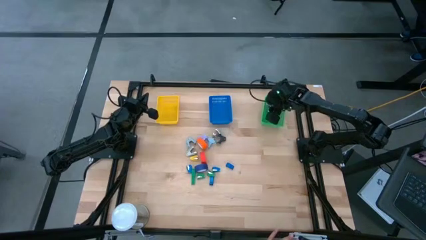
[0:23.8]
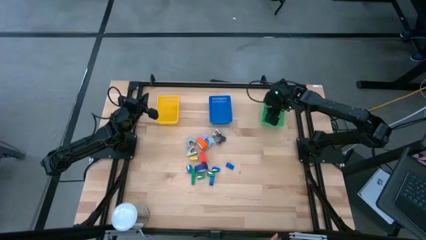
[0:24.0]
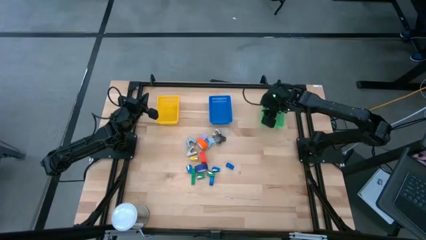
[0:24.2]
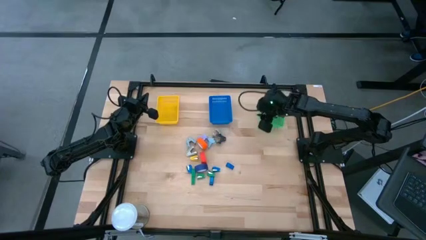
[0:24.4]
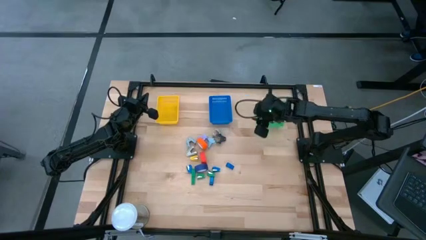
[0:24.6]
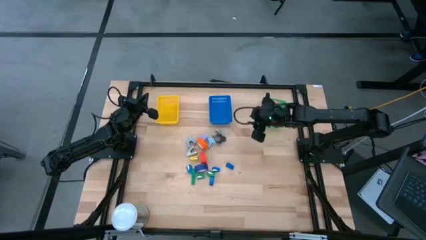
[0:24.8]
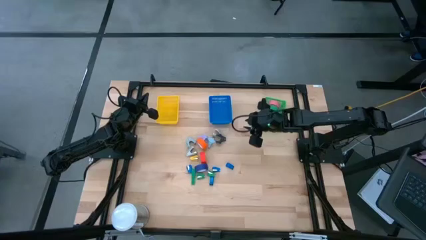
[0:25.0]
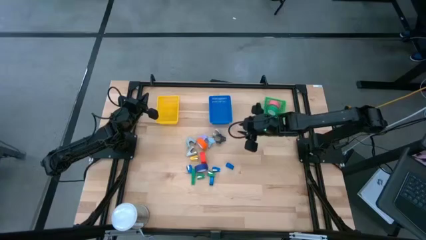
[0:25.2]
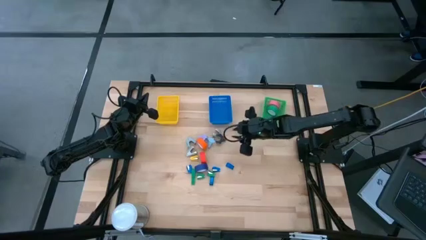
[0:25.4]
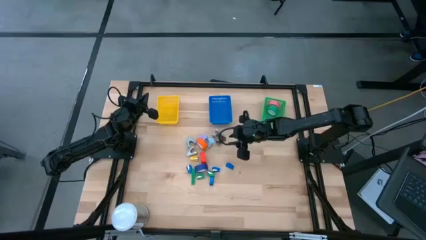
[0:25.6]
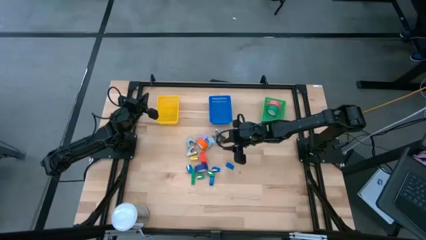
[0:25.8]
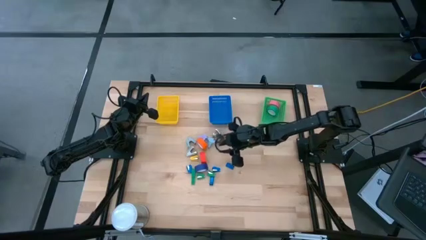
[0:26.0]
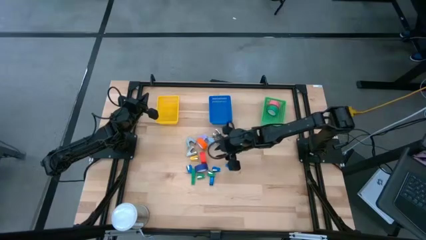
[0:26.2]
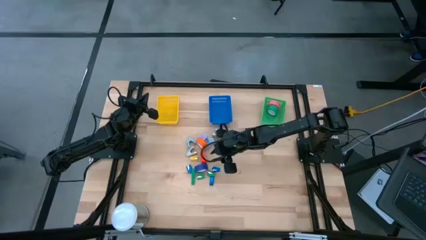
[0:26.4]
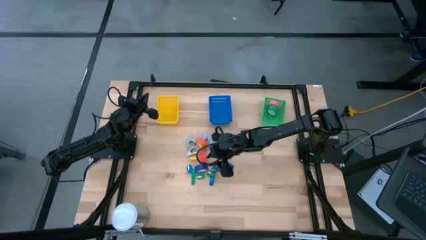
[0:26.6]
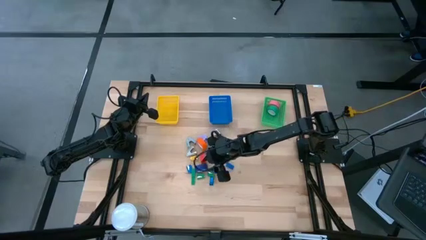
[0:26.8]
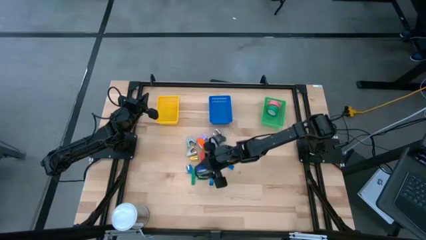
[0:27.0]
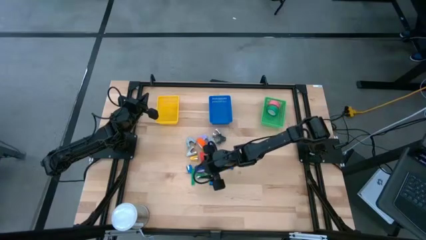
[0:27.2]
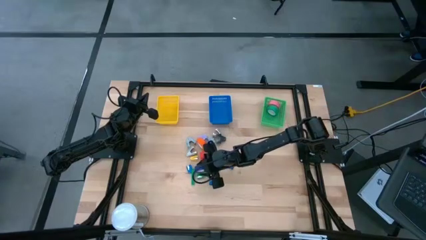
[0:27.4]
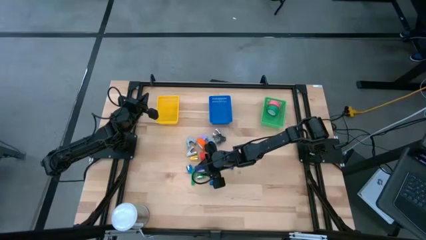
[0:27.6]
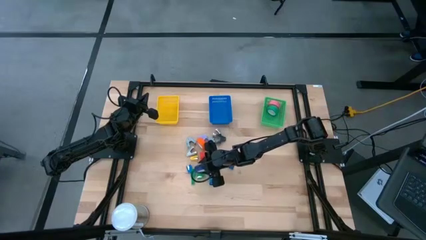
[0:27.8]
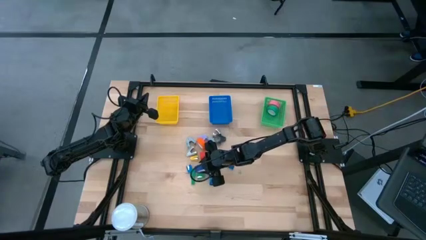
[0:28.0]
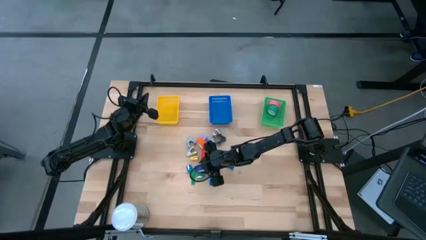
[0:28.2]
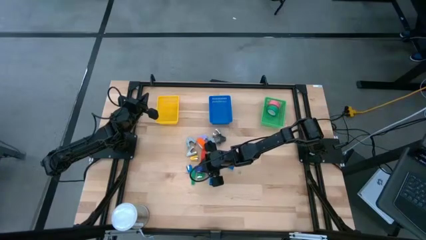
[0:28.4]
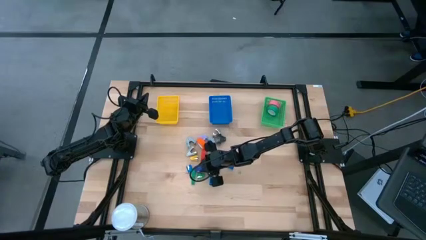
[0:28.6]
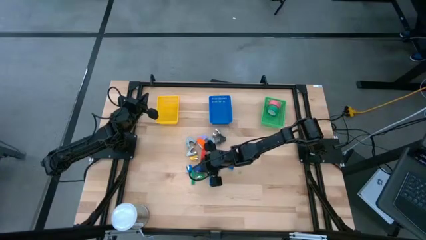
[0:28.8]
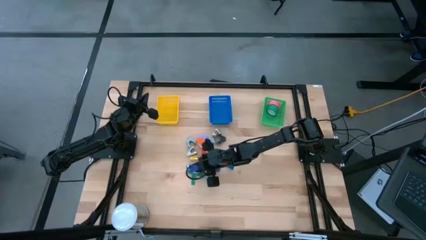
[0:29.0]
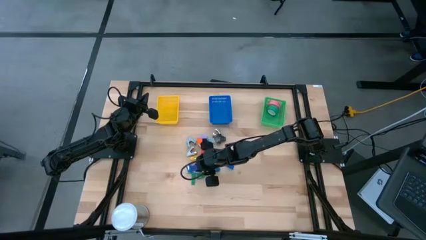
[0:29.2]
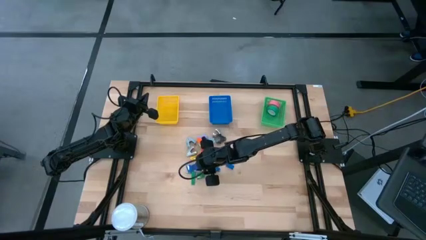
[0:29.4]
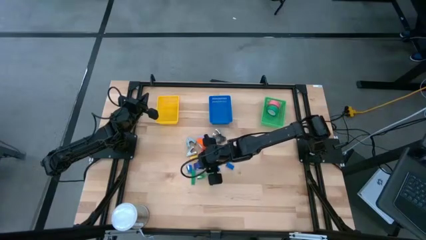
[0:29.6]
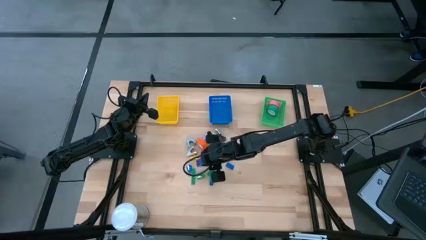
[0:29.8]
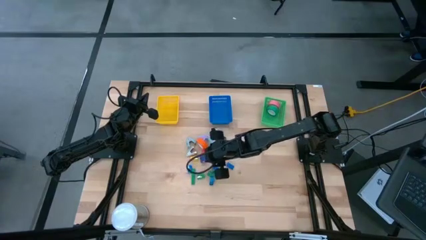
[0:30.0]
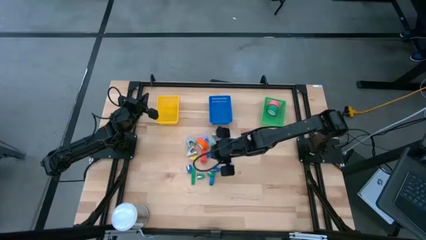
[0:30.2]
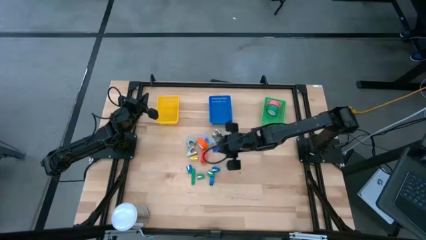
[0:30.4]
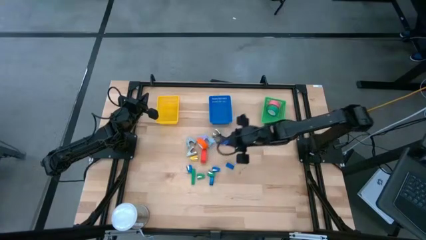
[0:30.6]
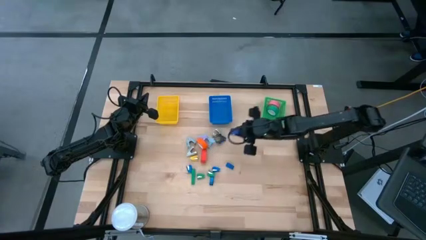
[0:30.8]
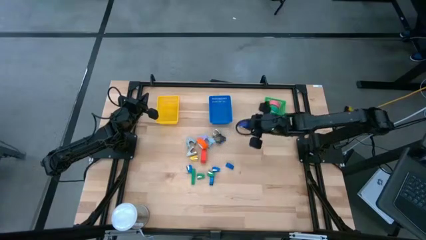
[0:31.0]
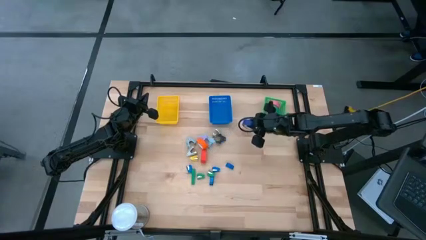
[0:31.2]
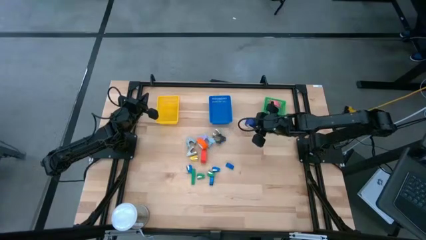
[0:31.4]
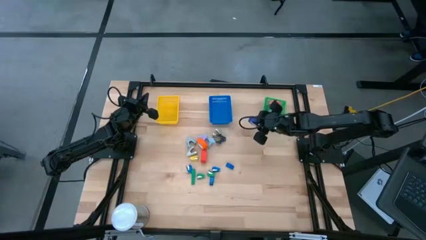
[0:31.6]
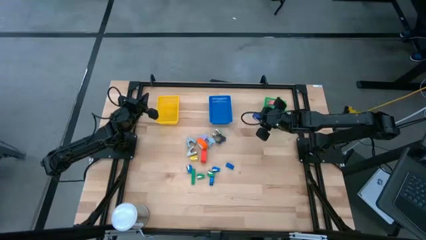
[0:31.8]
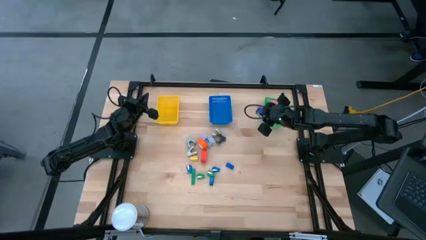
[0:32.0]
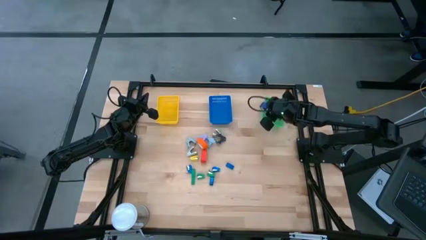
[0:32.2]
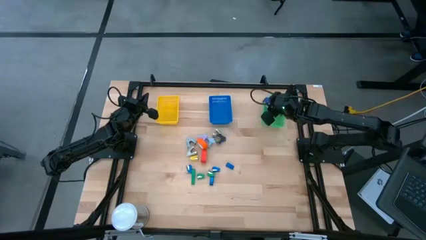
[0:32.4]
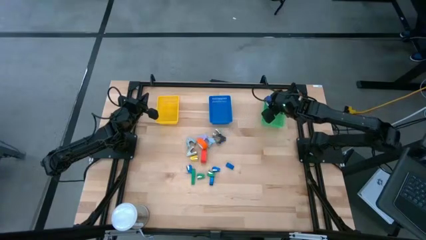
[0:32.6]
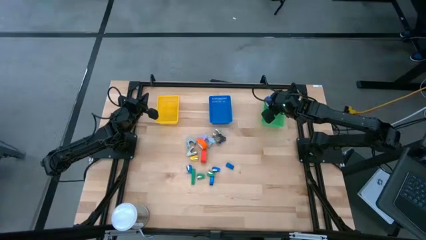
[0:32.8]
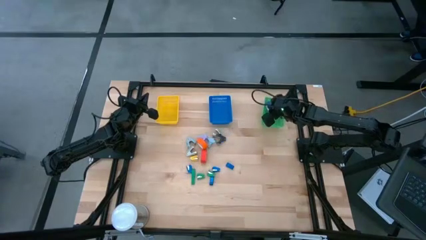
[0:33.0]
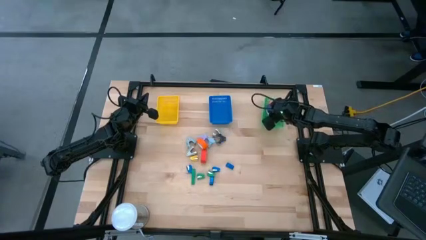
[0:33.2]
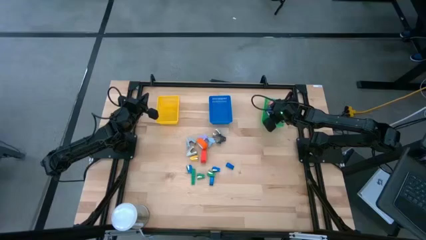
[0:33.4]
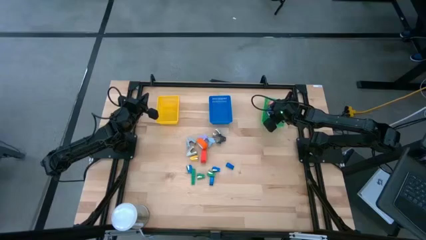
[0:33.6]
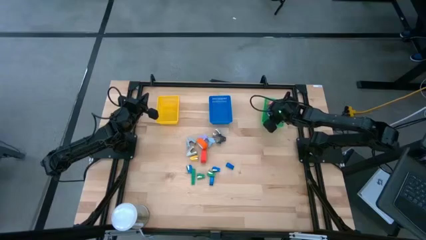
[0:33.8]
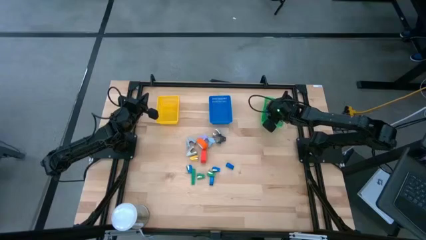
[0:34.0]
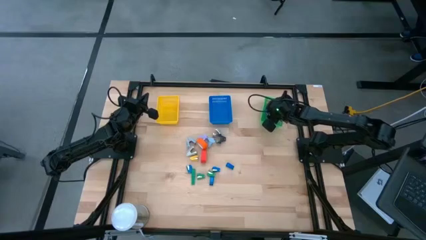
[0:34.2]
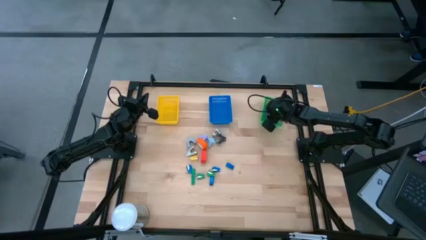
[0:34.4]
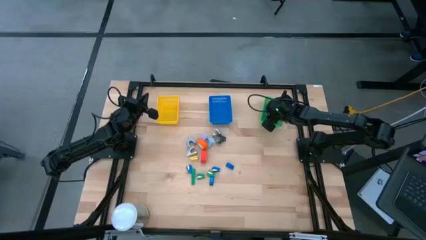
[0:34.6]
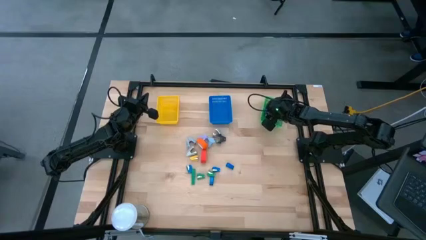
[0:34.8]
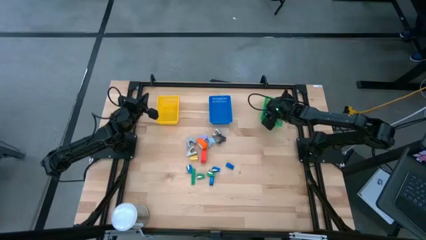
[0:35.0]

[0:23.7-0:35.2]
Task: Pick and place Stapler, Stapler remover, tape
Put the blue tape into the green basket

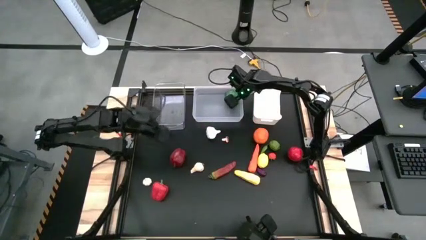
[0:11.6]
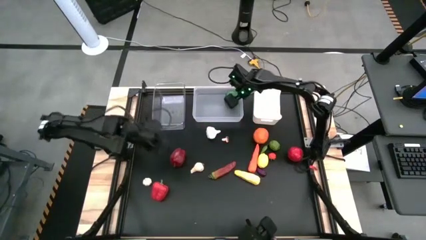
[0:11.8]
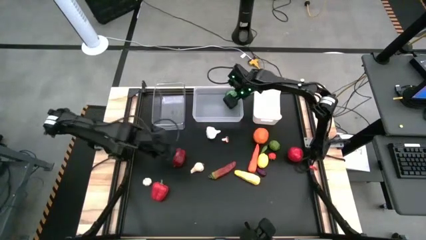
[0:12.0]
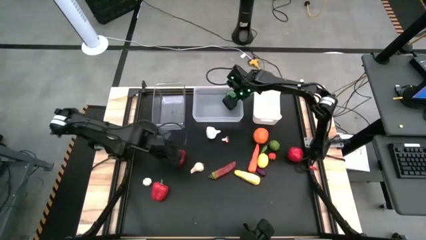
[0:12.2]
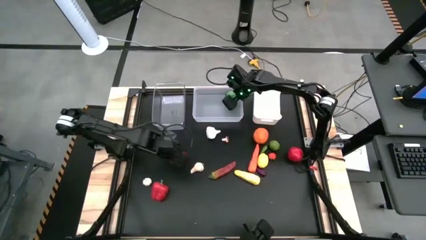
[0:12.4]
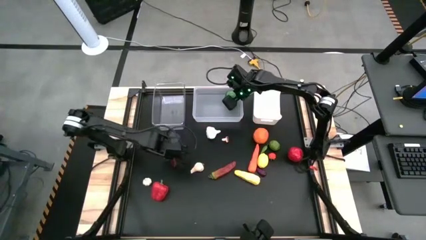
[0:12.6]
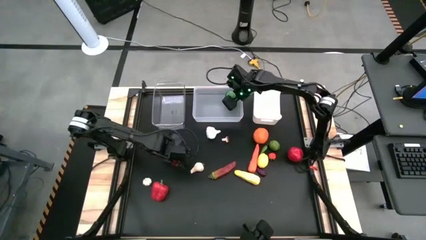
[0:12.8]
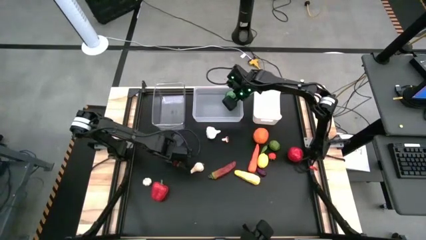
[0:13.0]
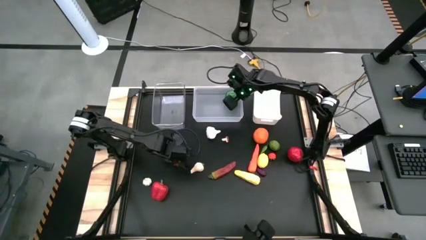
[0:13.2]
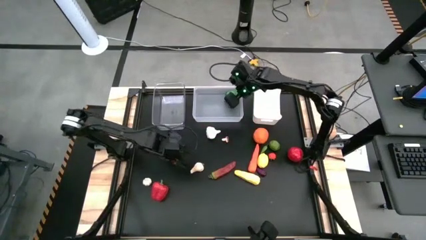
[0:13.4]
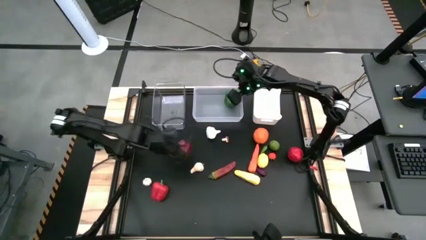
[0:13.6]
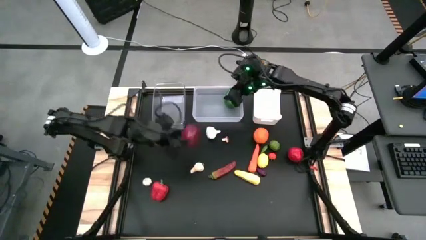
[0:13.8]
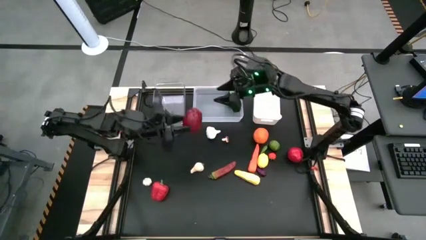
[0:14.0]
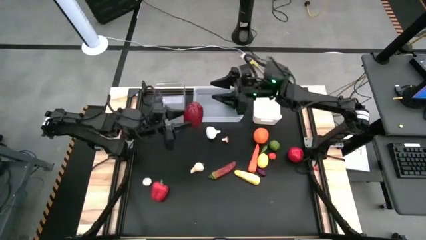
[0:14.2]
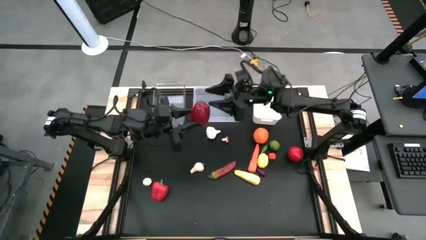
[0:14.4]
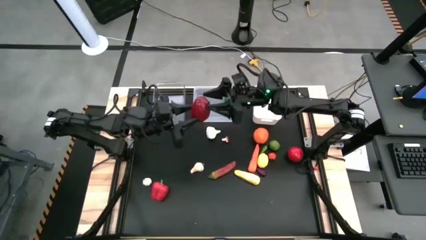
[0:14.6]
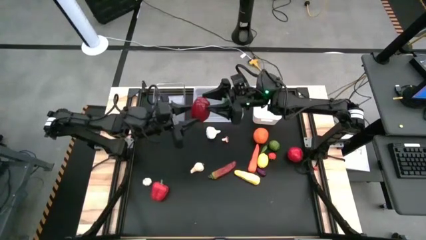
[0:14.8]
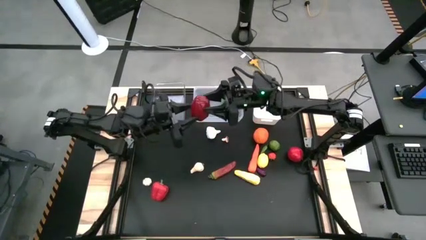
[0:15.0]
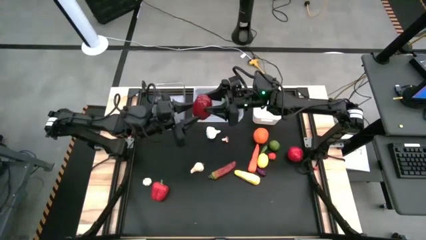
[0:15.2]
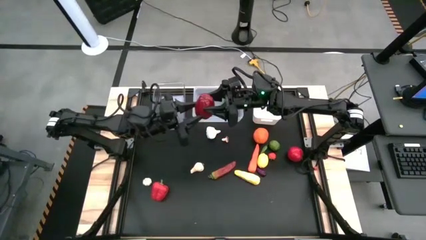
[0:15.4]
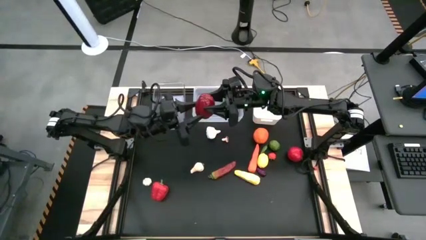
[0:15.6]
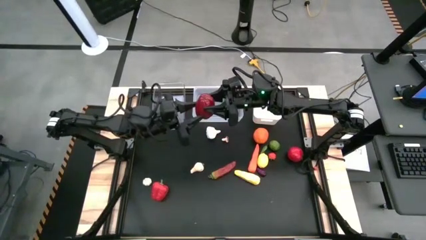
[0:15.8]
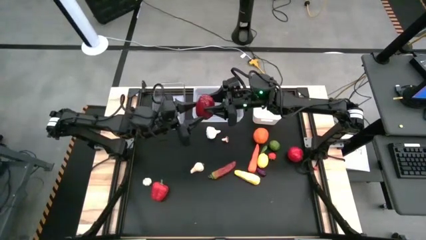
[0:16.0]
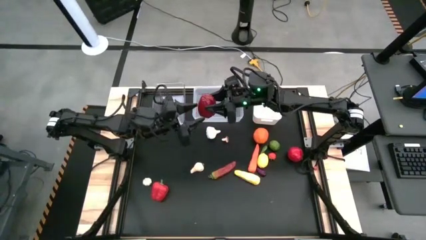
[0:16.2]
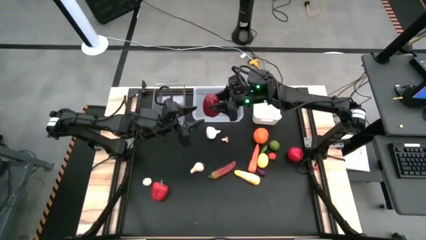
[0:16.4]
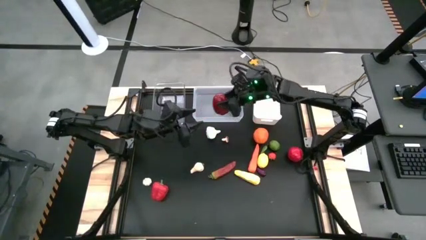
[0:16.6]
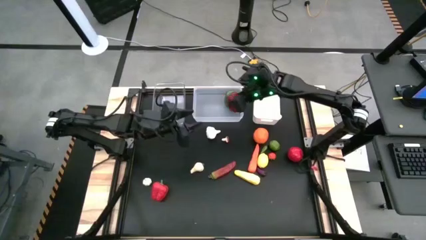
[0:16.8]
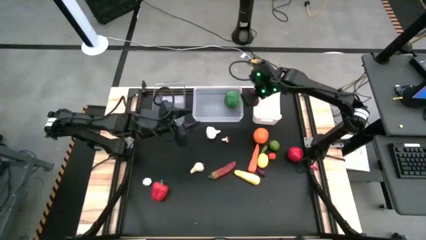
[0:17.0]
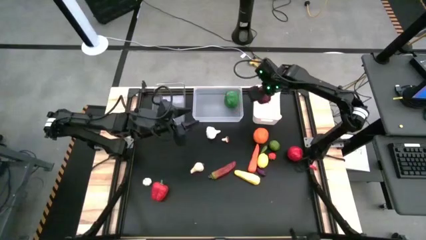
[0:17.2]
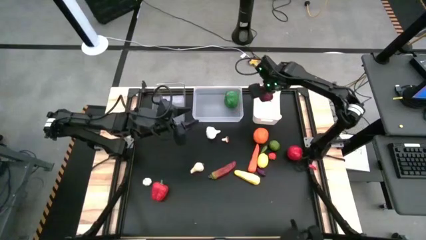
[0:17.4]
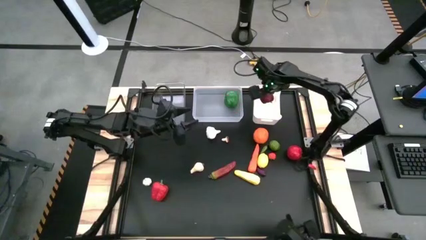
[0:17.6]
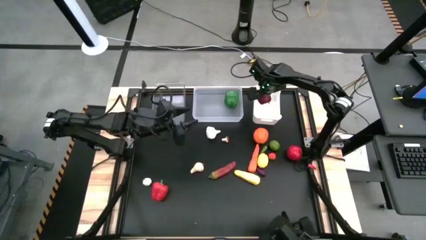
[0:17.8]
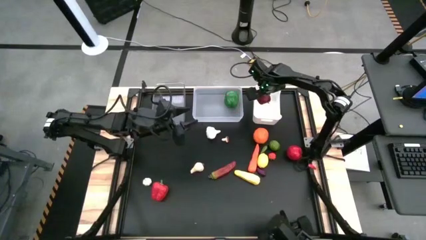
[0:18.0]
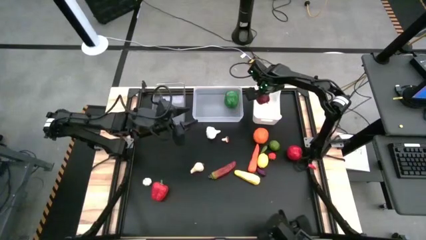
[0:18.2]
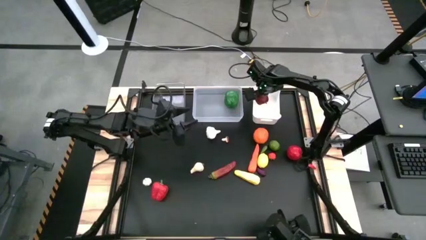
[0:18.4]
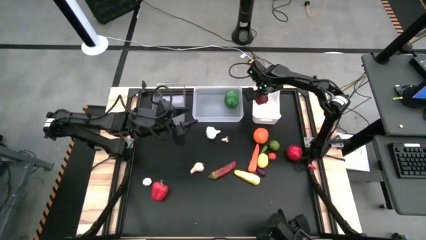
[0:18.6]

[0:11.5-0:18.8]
Task: Sort produce into baskets
Put the red apple into the white bin
